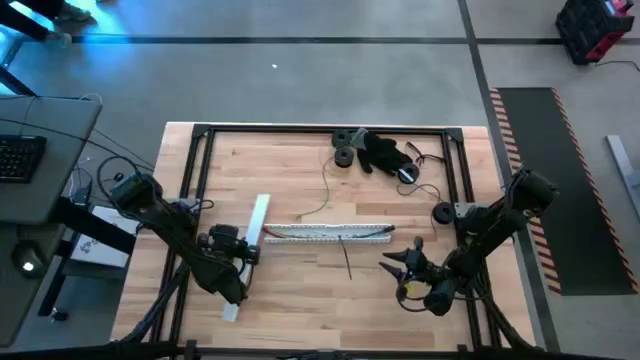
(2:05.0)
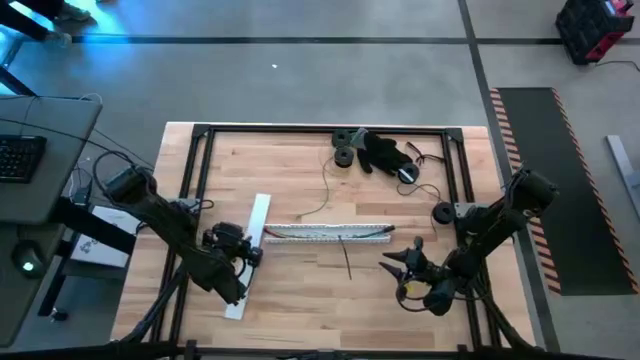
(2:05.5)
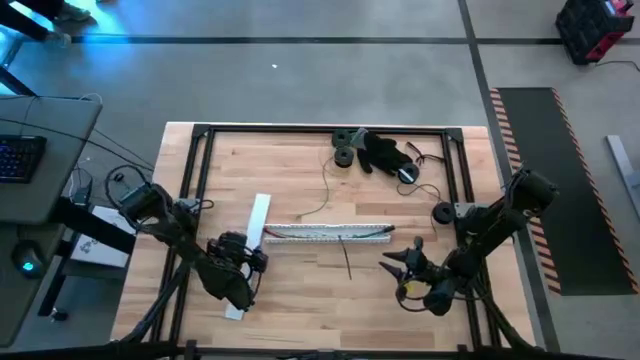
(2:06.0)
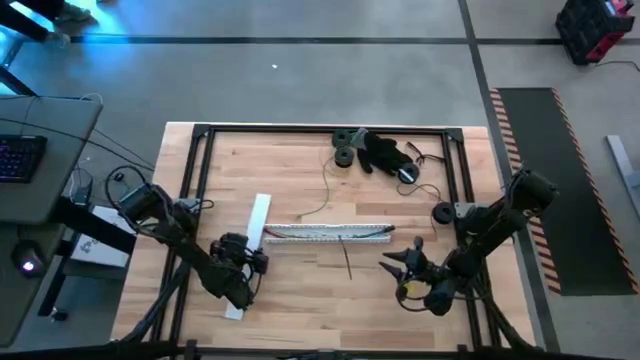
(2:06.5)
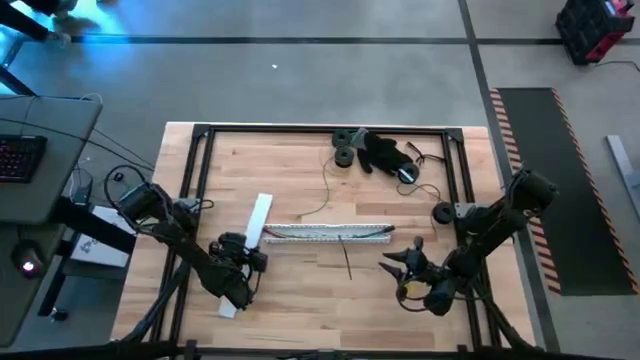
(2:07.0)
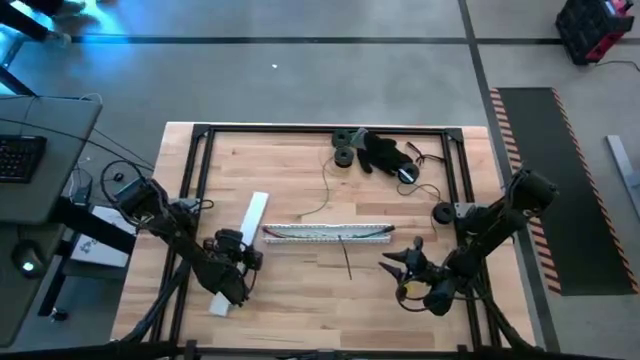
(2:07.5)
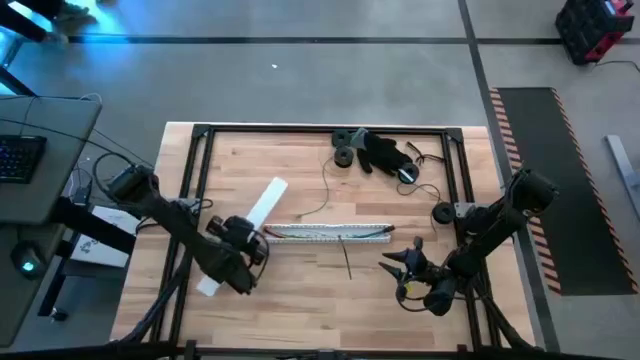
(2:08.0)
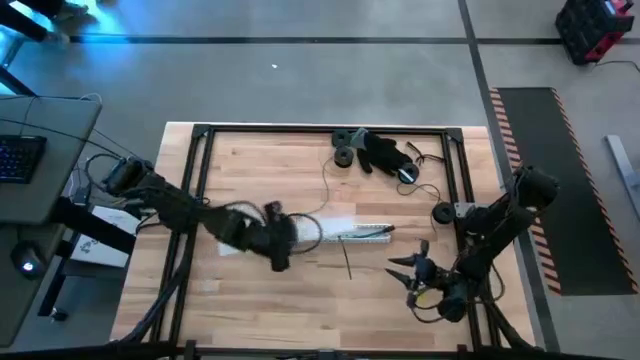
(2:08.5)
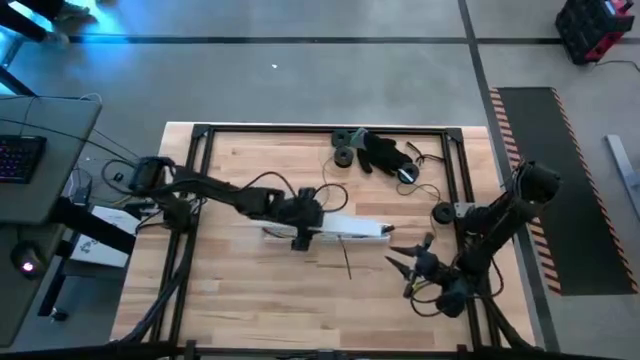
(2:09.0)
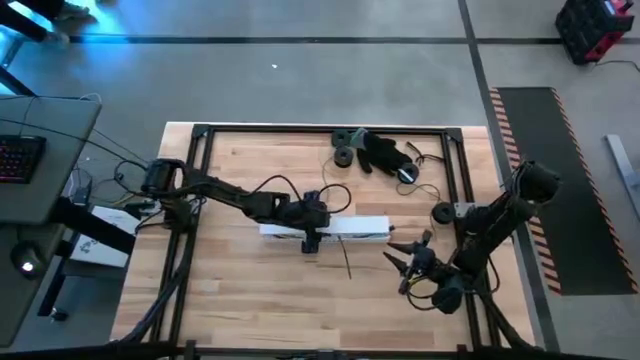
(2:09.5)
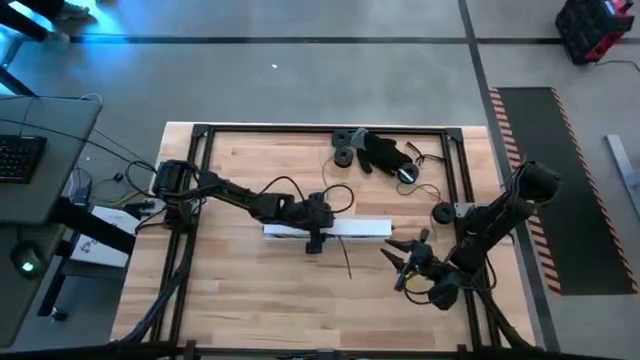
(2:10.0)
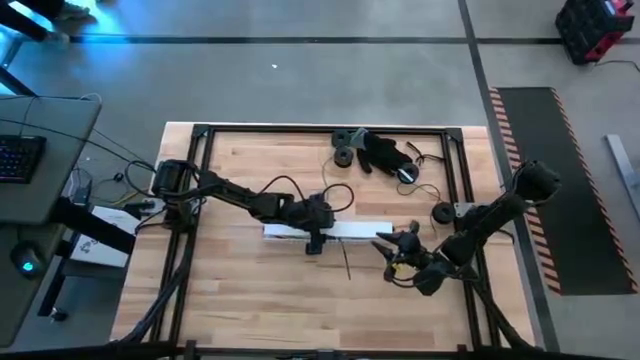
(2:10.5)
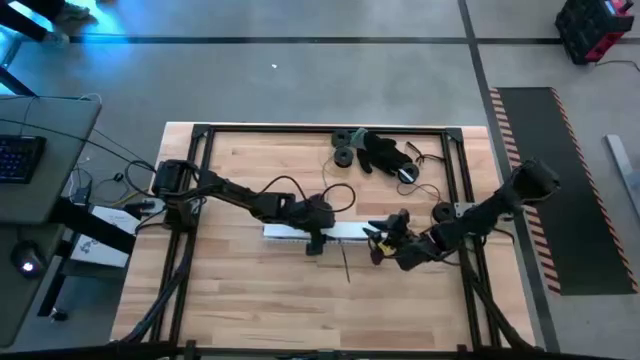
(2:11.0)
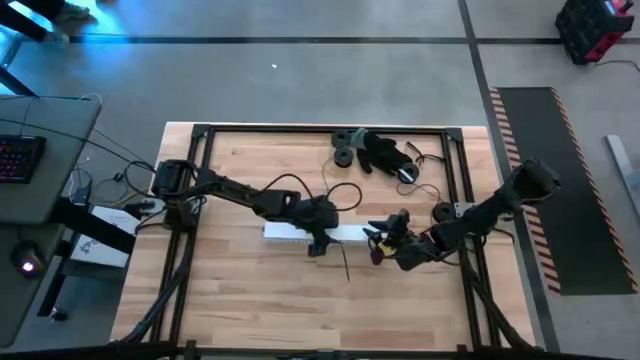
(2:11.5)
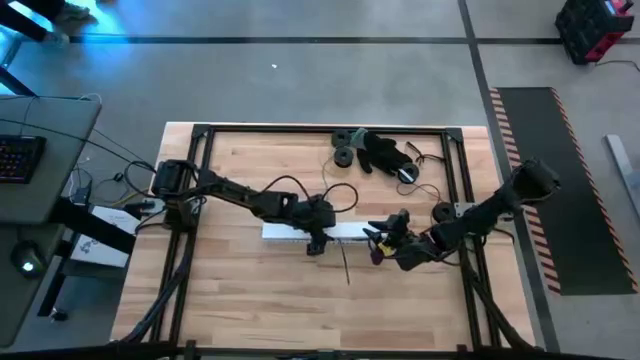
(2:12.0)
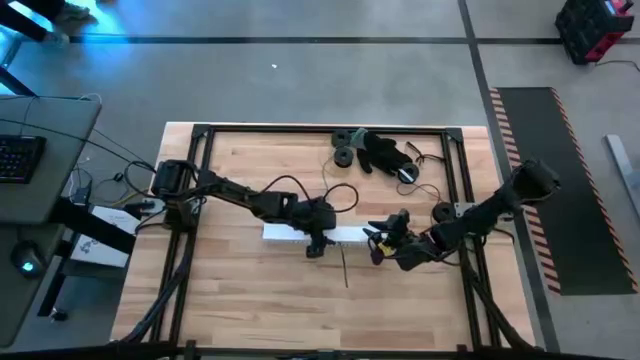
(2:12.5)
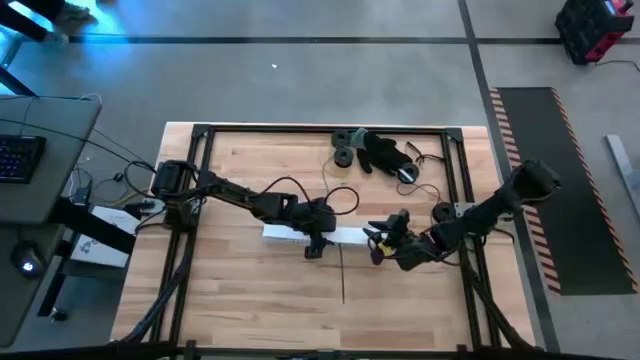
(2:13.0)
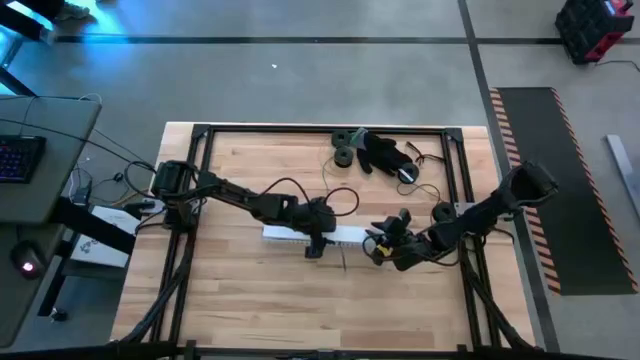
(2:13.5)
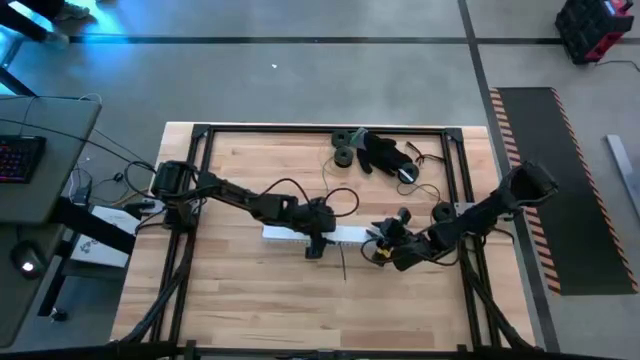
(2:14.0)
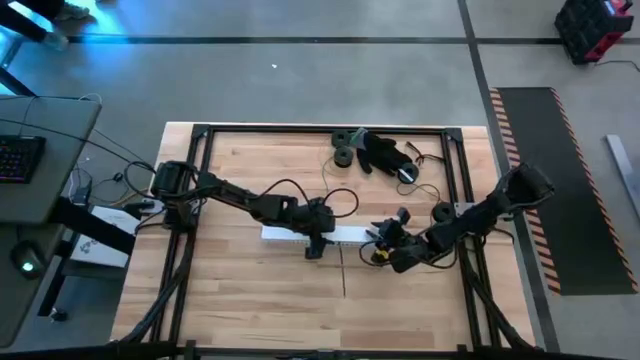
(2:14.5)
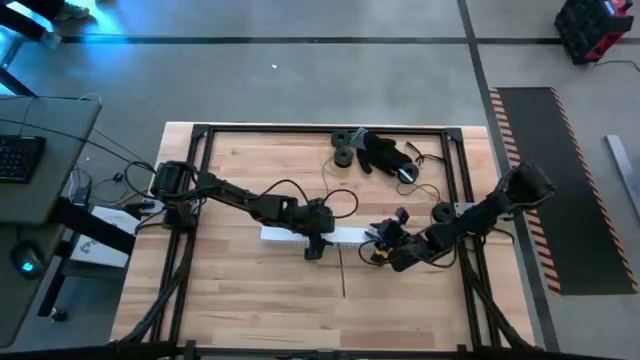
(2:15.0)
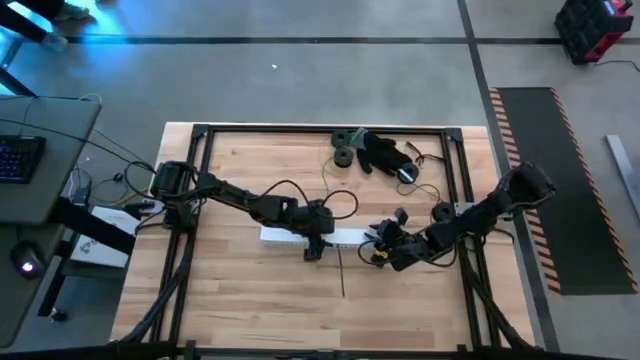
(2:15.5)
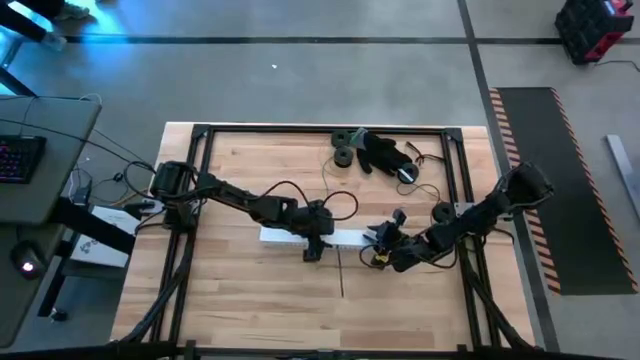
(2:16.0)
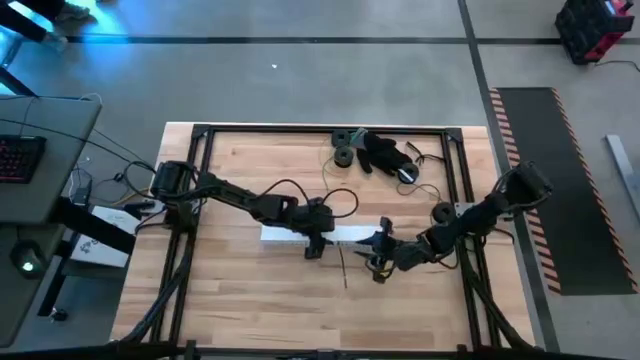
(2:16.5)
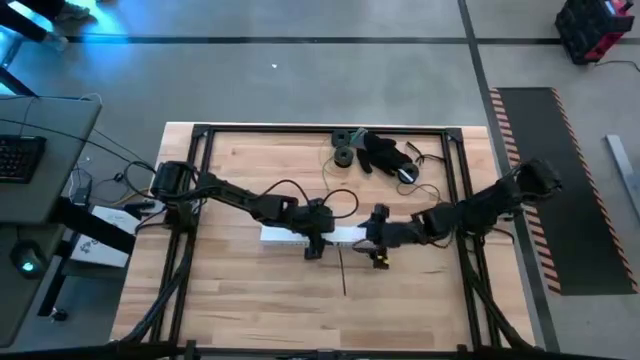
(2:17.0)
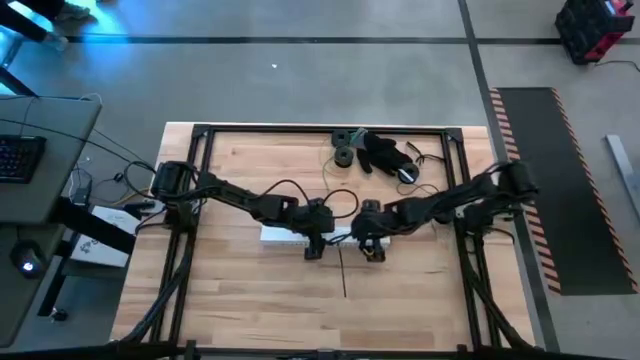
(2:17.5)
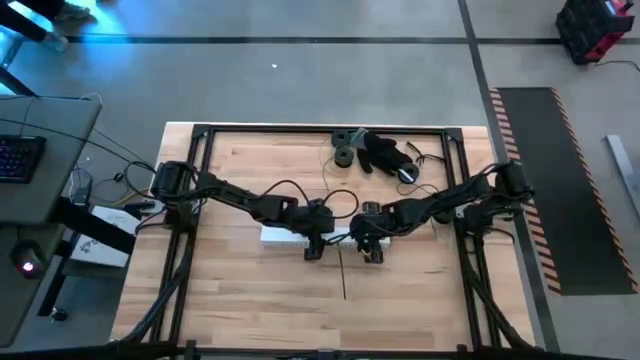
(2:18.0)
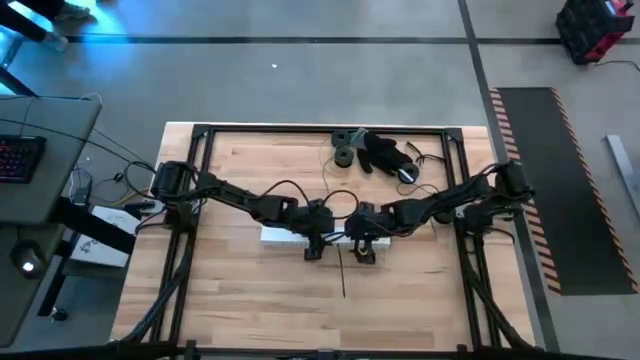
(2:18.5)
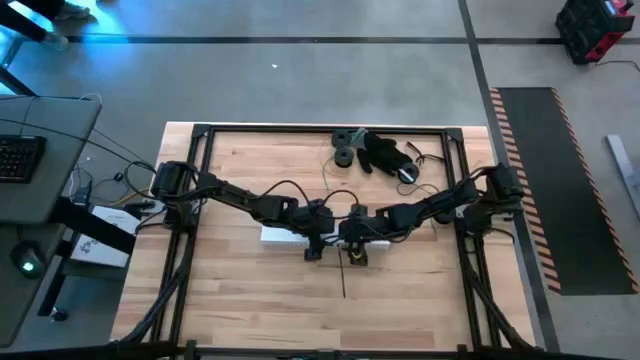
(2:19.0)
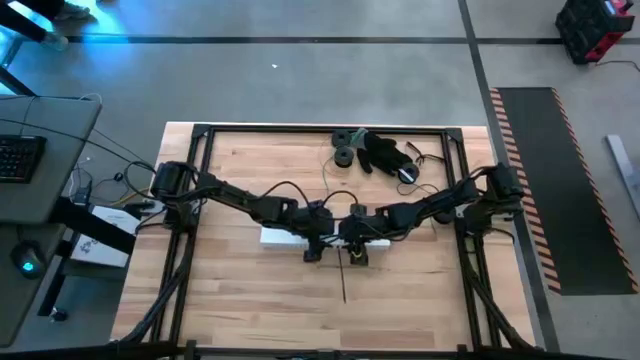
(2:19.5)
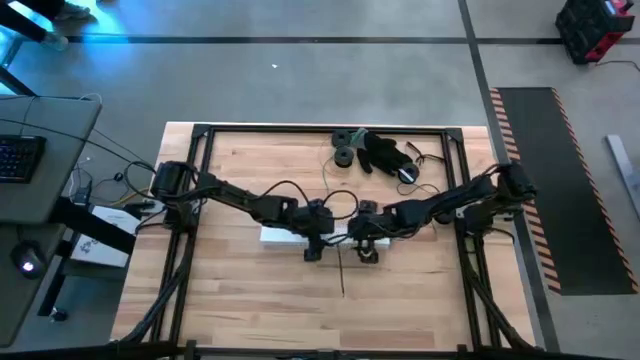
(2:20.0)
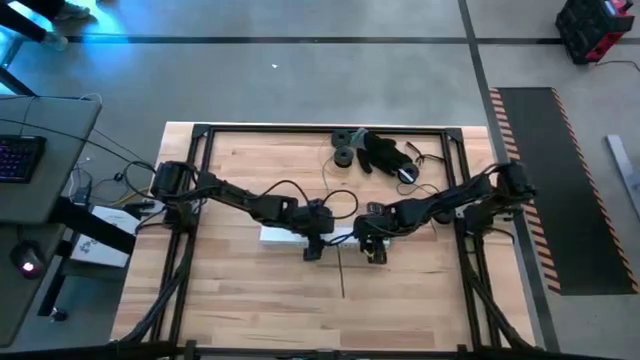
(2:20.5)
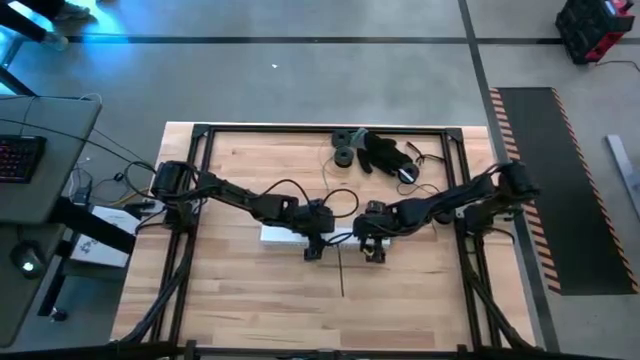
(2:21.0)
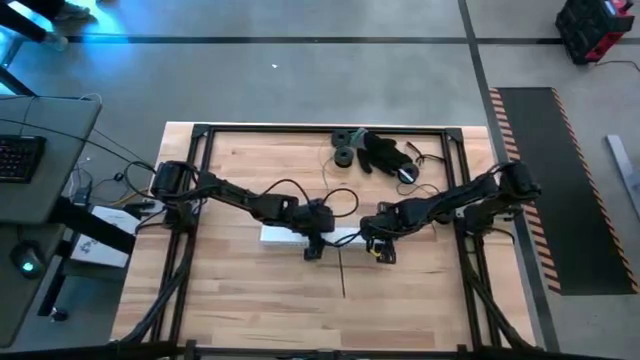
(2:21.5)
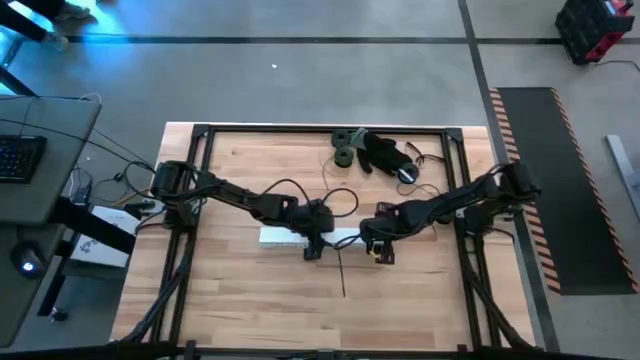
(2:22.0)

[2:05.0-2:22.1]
Task: Ziptie cables
Close the white cable duct

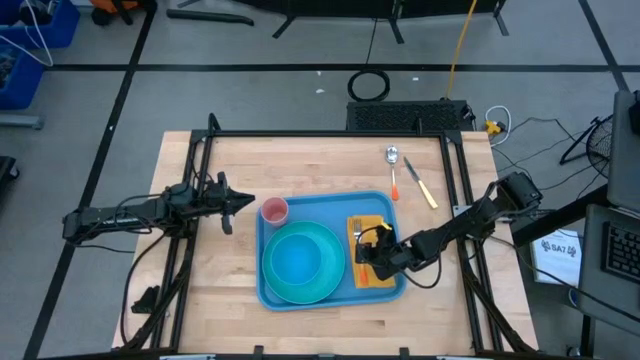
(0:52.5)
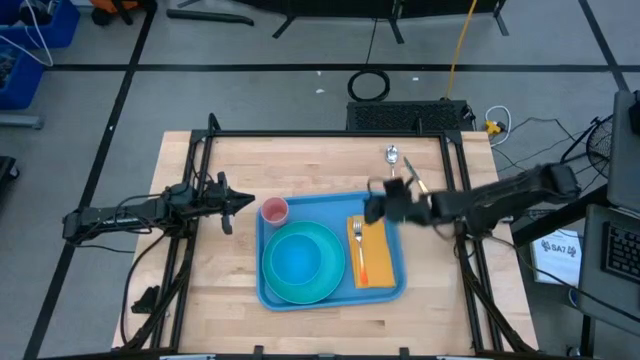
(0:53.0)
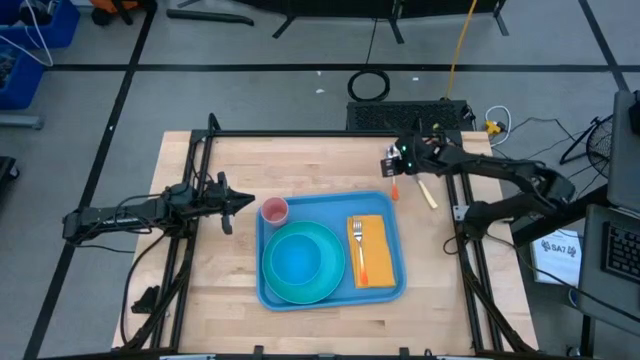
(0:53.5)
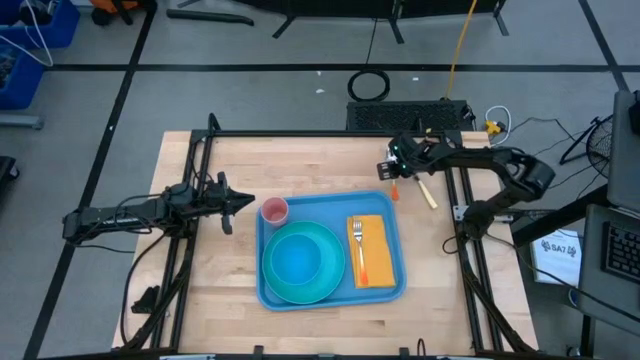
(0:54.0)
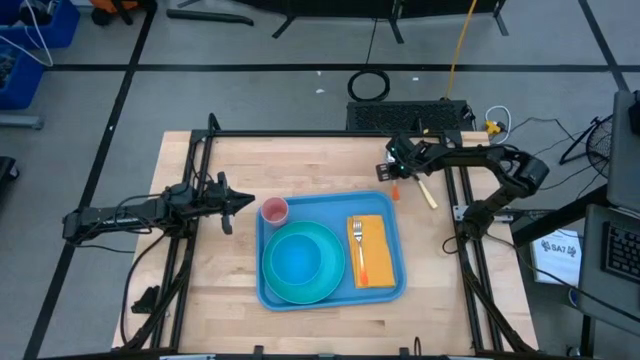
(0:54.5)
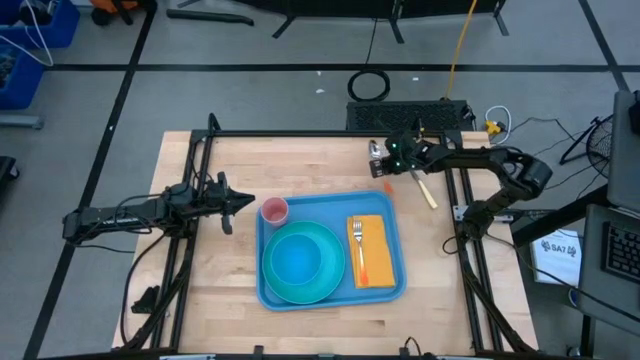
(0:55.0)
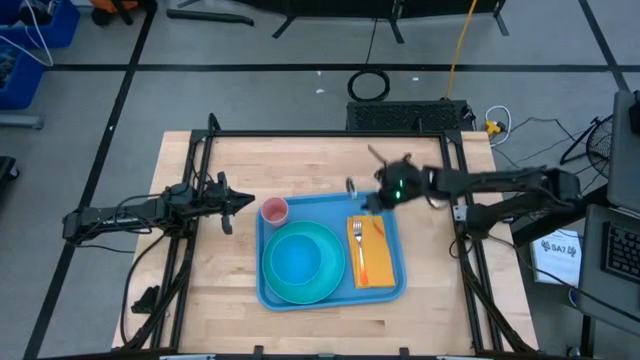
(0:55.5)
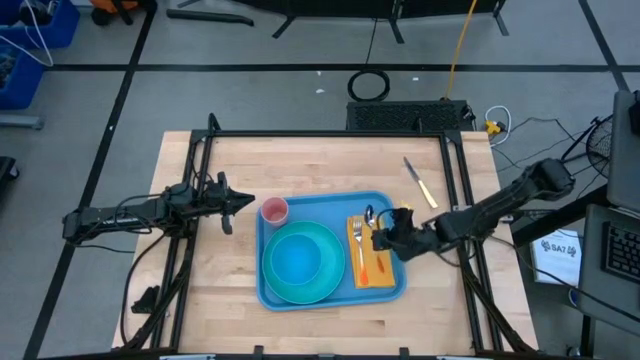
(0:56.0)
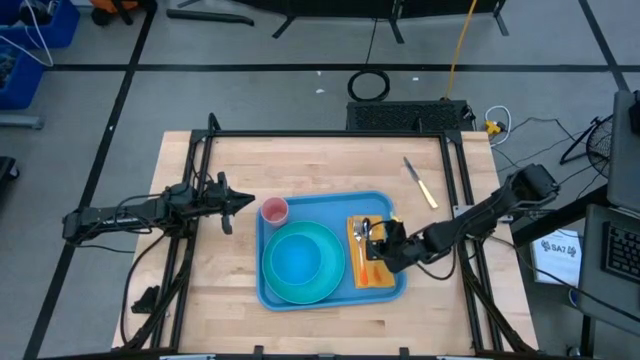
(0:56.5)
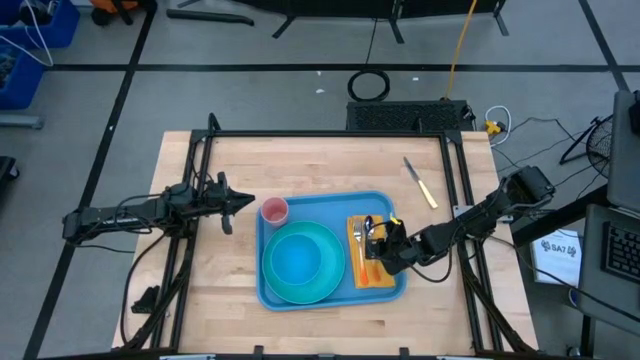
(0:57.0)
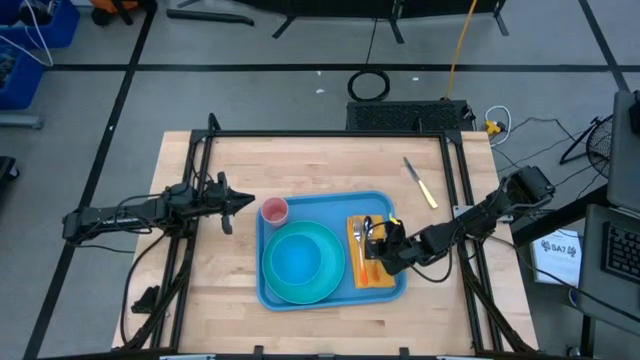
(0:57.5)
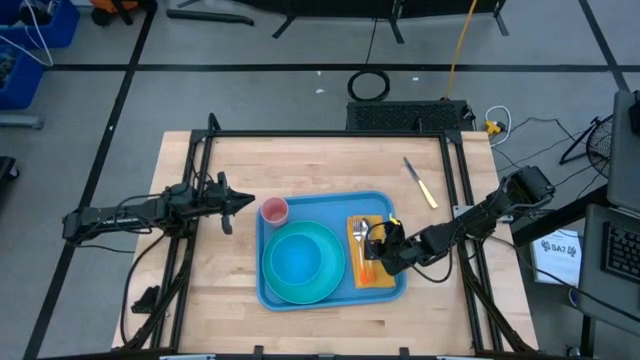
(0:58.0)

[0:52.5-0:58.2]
Task: Set up tray
Put the orange spoon on the yellow napkin to the right of the orange fork
